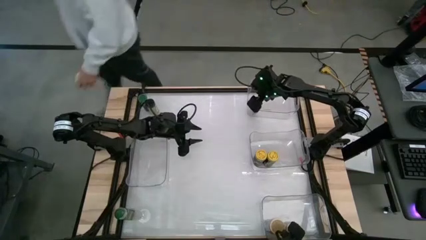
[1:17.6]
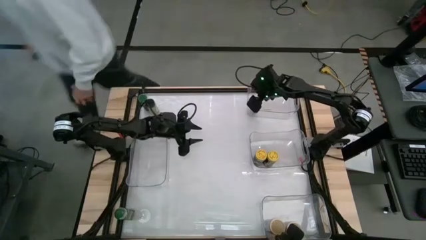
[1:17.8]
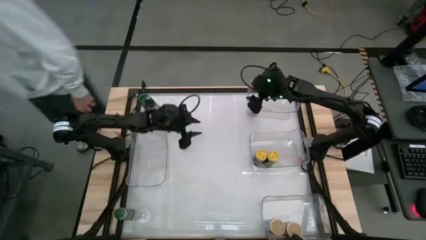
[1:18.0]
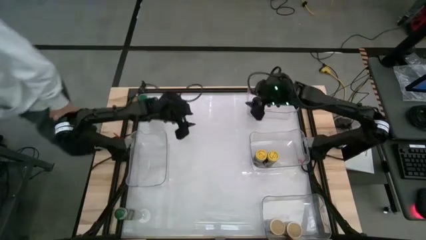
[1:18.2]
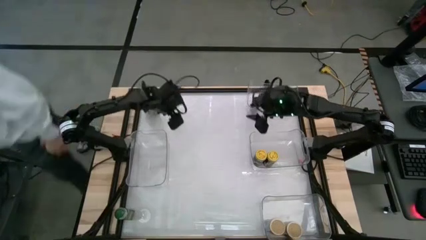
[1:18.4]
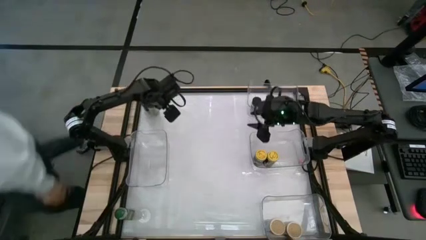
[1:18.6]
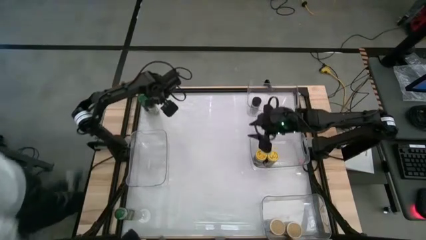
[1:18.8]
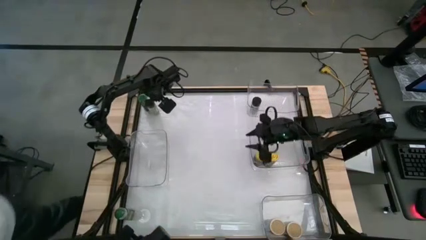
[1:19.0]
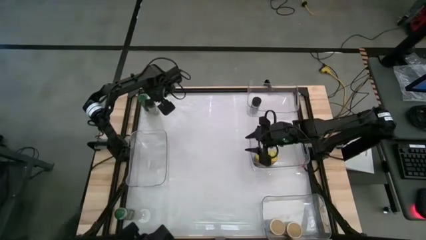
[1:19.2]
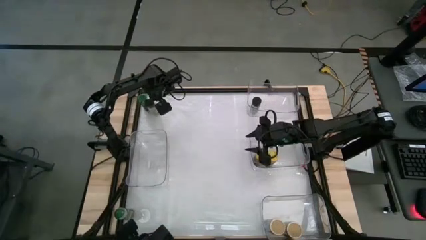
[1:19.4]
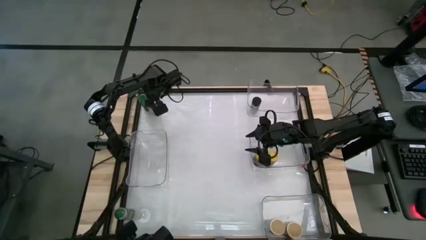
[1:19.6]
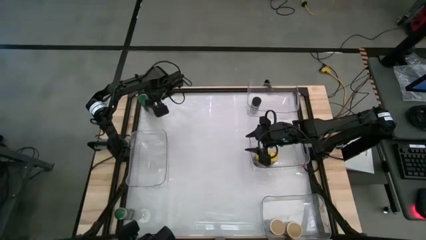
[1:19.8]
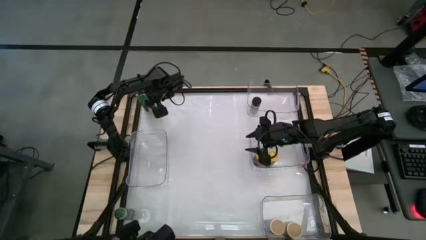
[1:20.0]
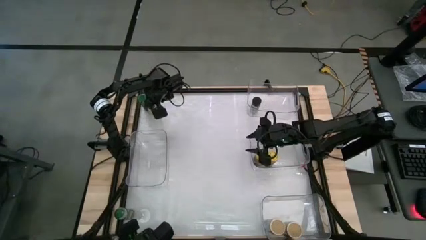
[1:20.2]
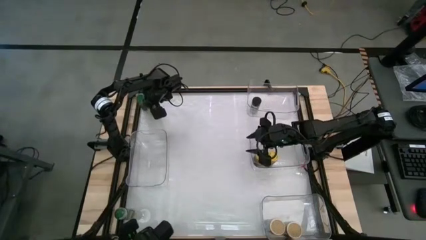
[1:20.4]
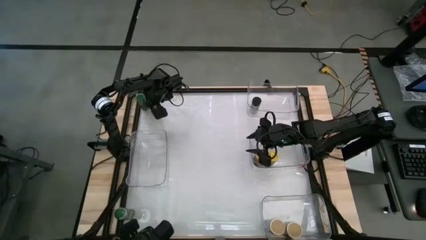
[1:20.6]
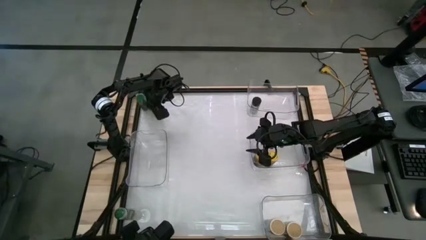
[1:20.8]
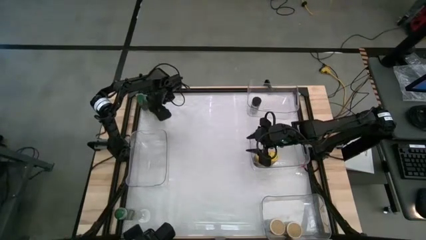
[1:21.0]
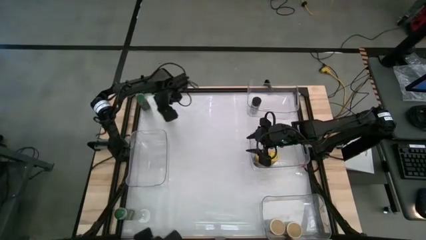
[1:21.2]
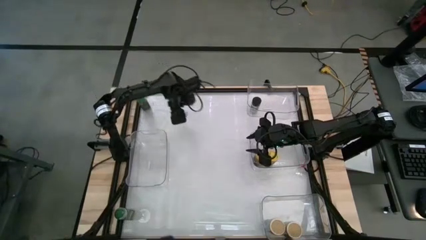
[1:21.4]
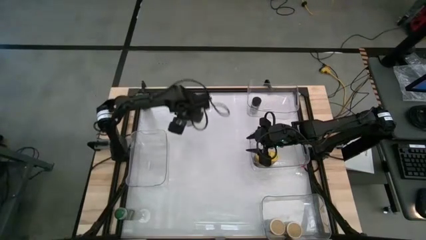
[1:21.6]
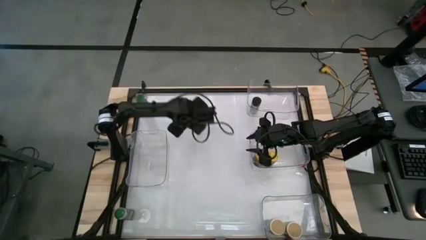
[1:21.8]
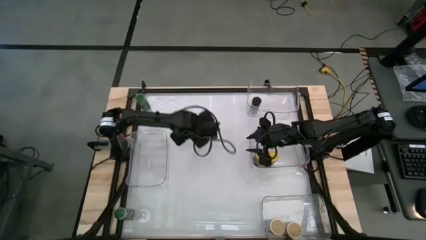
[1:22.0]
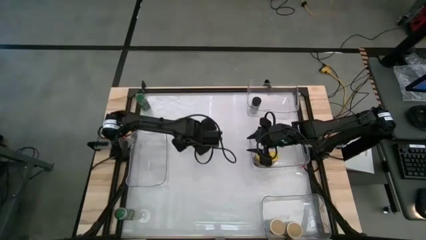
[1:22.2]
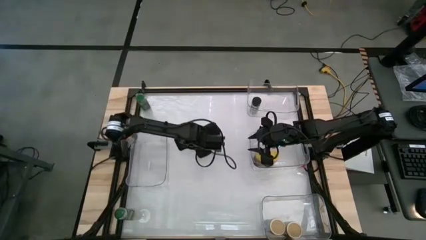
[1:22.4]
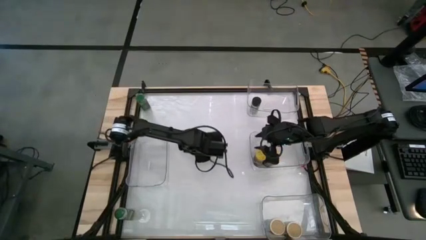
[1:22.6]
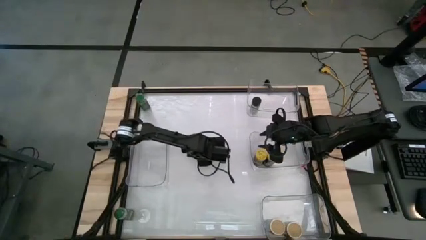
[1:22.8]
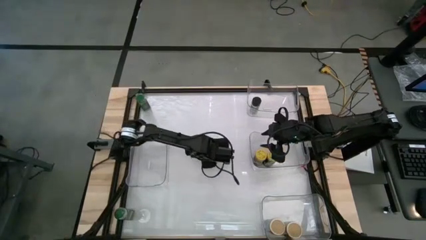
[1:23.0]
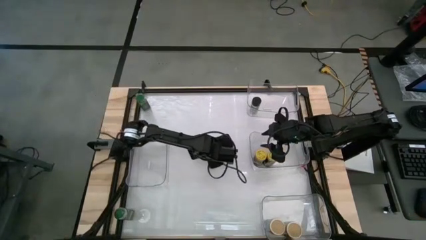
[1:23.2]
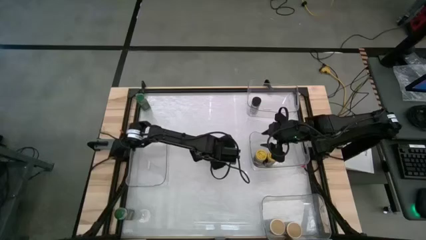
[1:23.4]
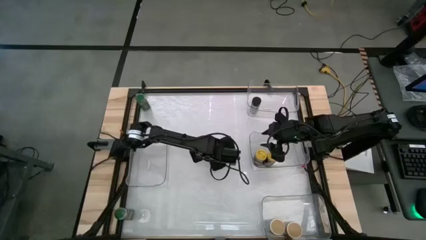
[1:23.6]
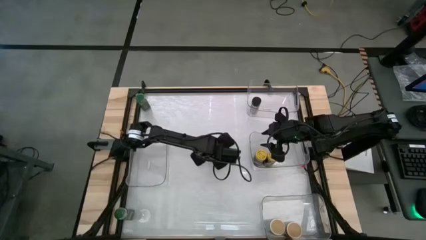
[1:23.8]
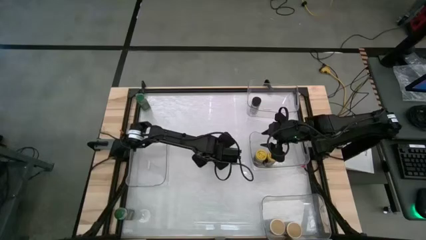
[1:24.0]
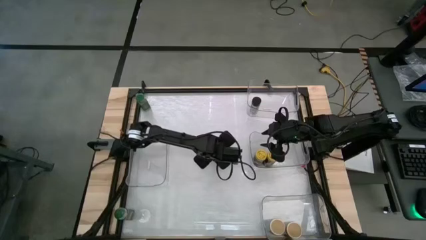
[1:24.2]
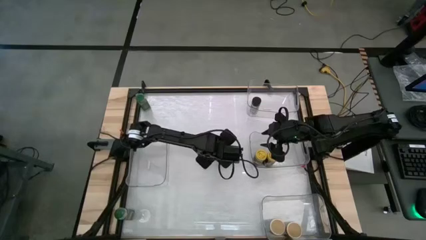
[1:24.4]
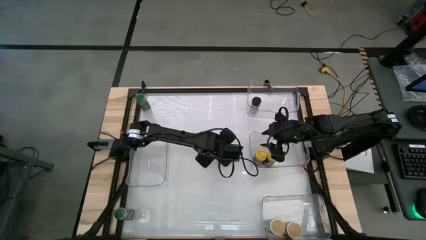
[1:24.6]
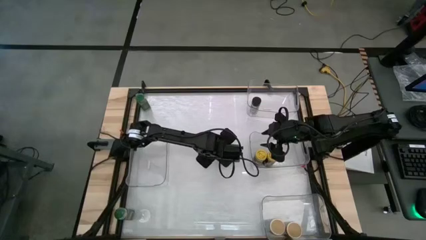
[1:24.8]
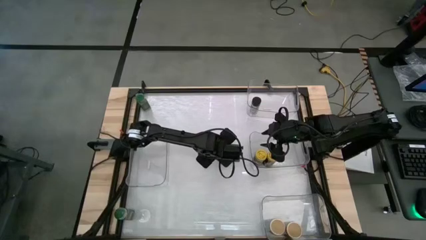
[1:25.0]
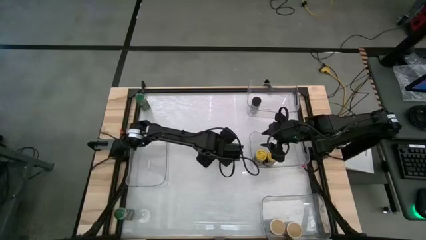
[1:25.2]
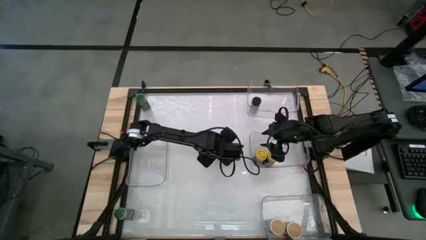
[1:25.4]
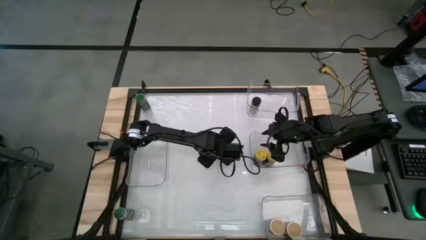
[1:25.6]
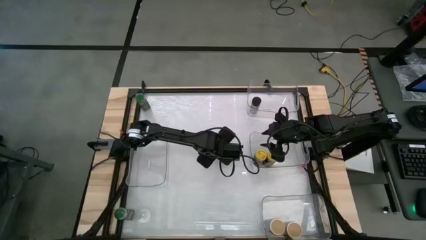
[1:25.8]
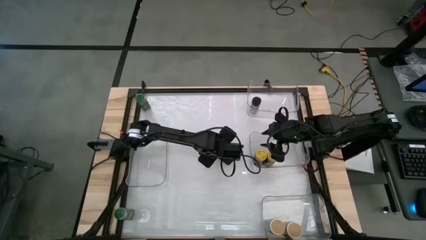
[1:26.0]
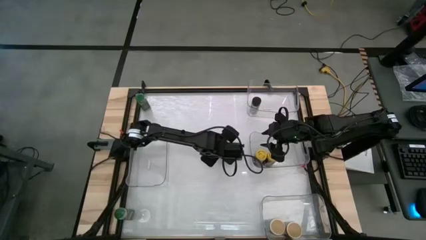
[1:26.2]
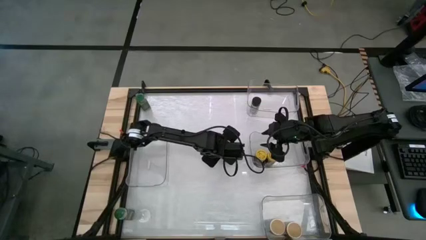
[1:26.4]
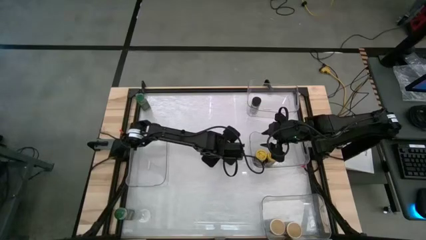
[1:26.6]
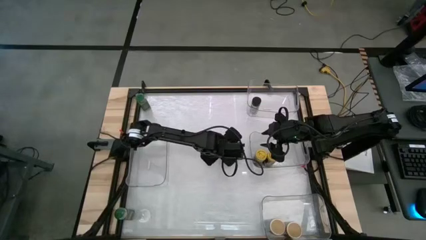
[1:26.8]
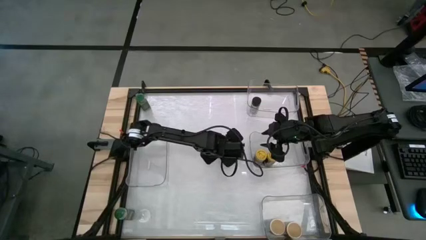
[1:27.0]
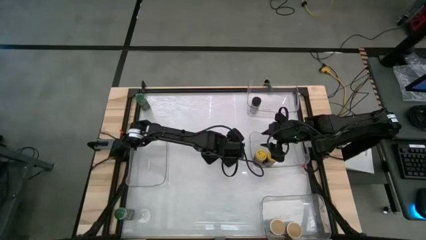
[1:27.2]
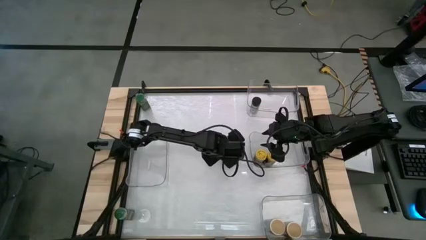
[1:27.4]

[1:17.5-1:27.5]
Task: Sort spices by type
Put the black seasoning bottle into the top right transparent bin
